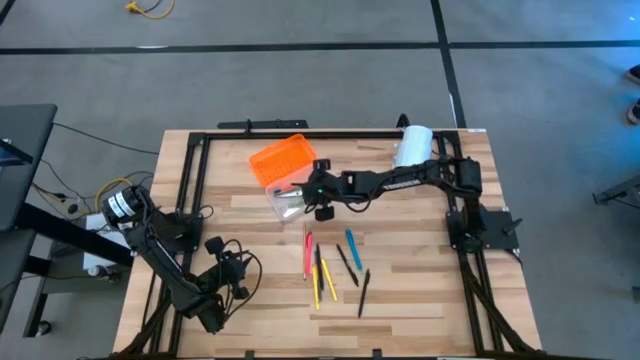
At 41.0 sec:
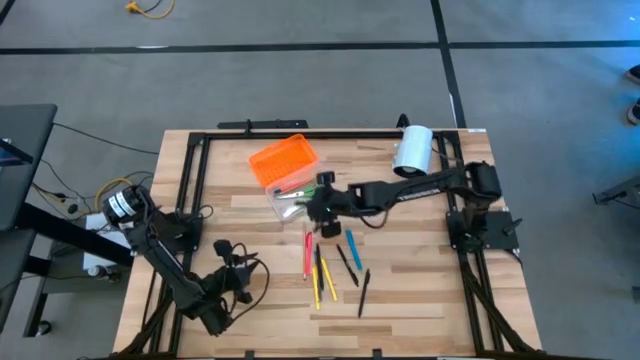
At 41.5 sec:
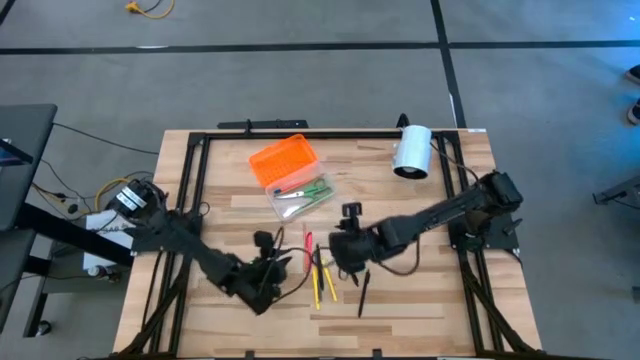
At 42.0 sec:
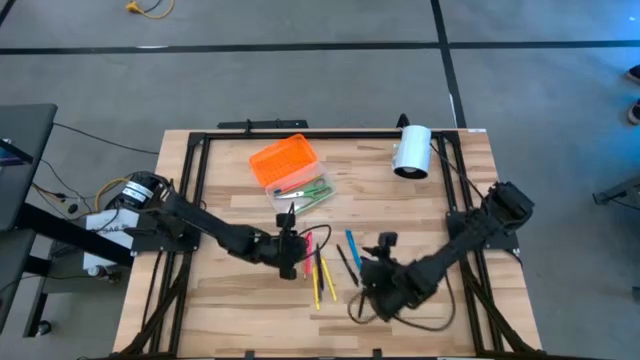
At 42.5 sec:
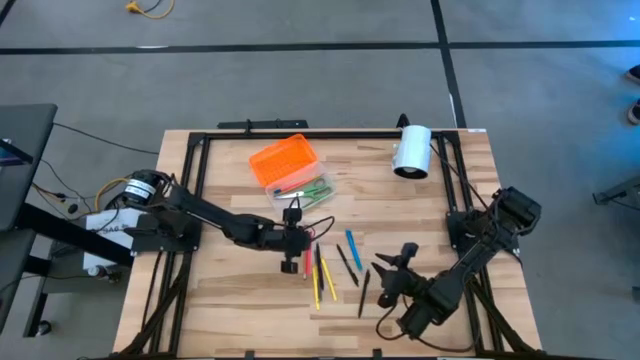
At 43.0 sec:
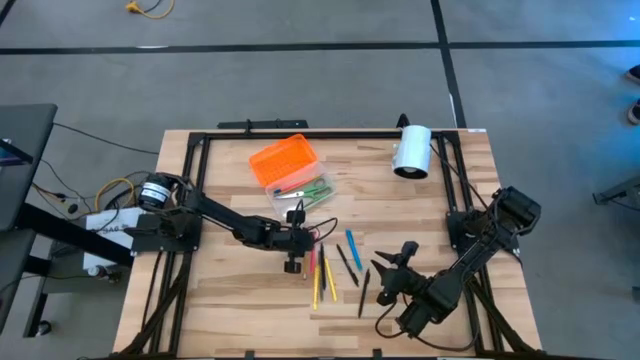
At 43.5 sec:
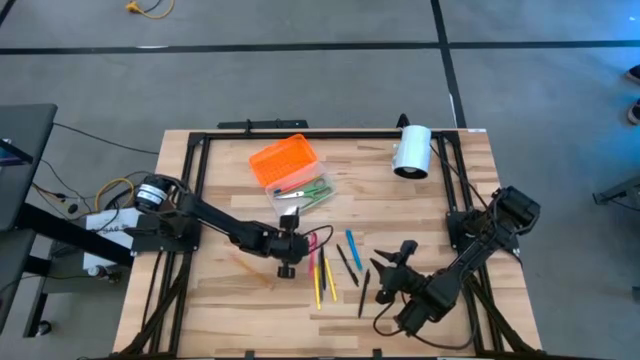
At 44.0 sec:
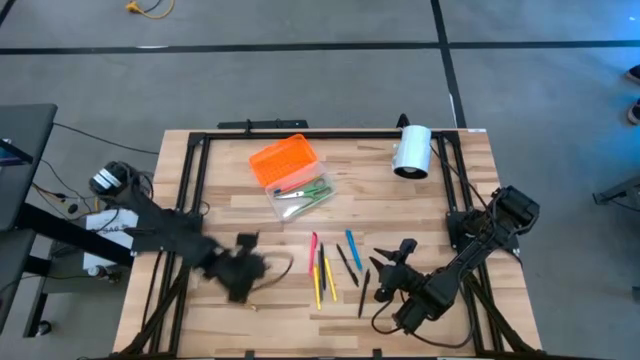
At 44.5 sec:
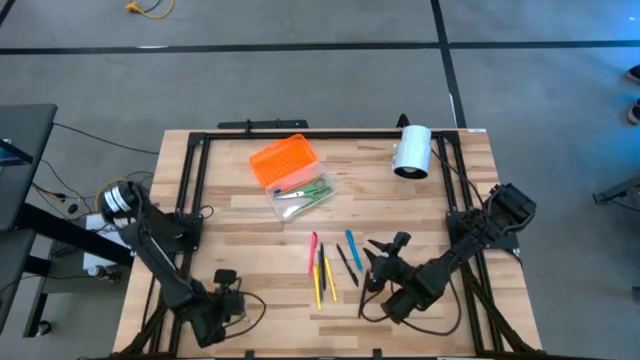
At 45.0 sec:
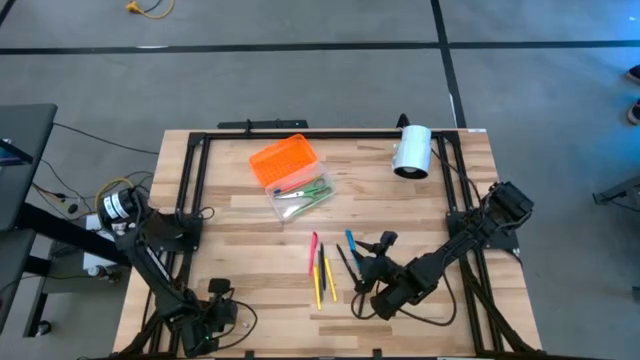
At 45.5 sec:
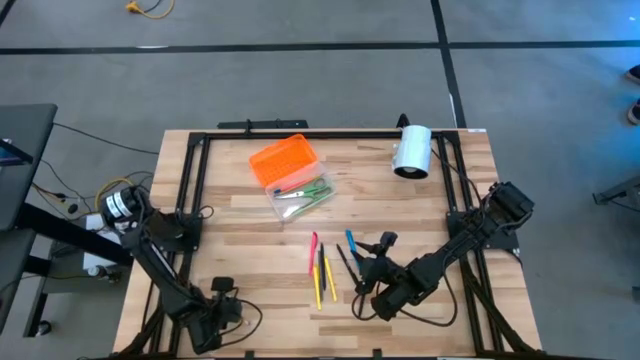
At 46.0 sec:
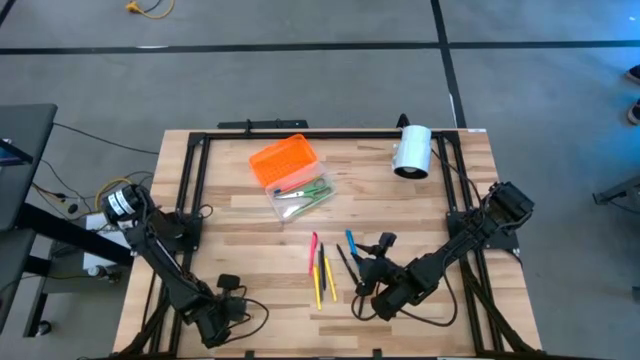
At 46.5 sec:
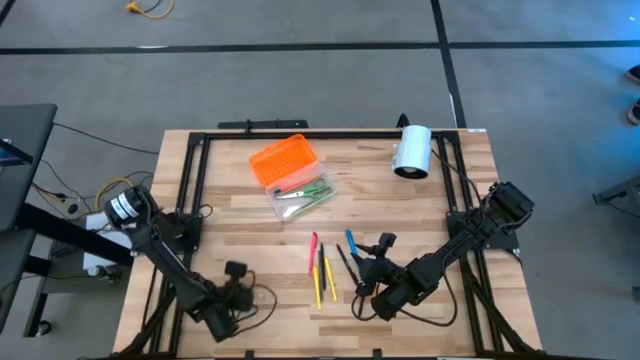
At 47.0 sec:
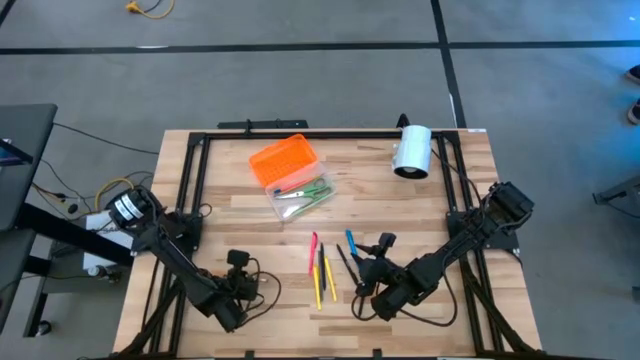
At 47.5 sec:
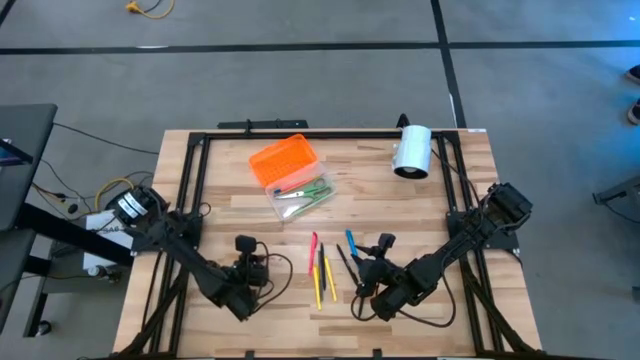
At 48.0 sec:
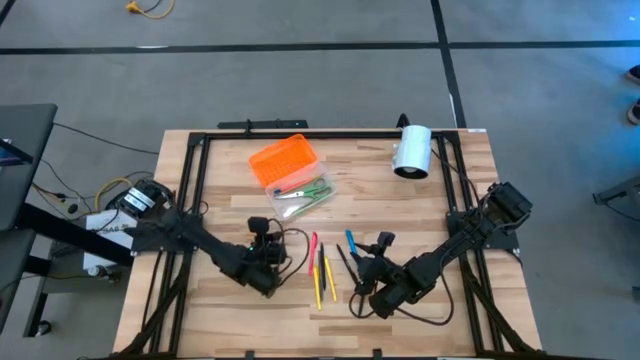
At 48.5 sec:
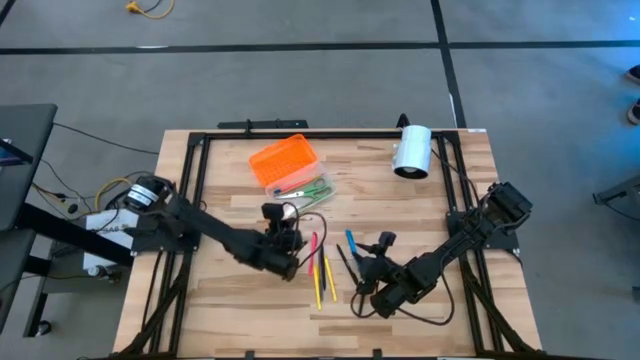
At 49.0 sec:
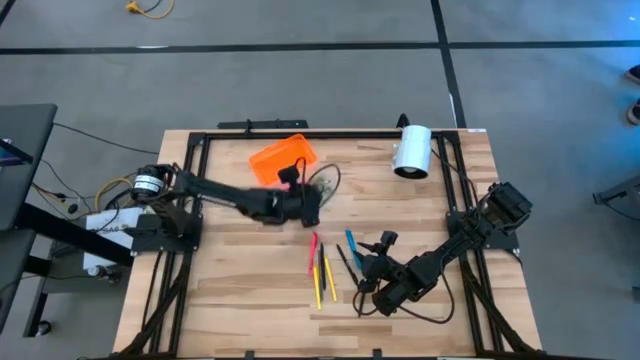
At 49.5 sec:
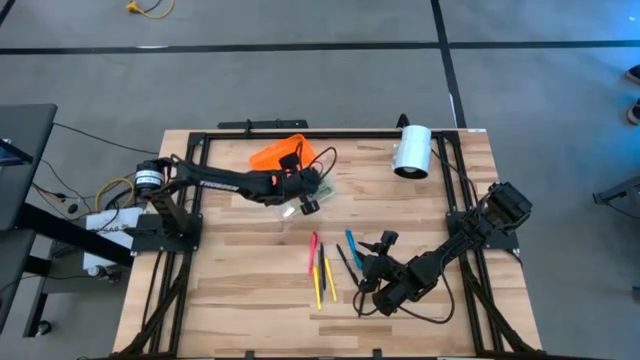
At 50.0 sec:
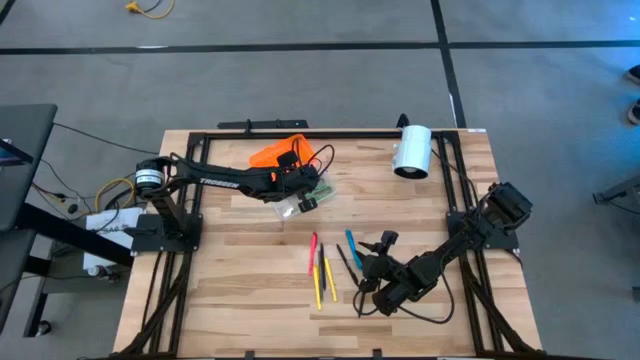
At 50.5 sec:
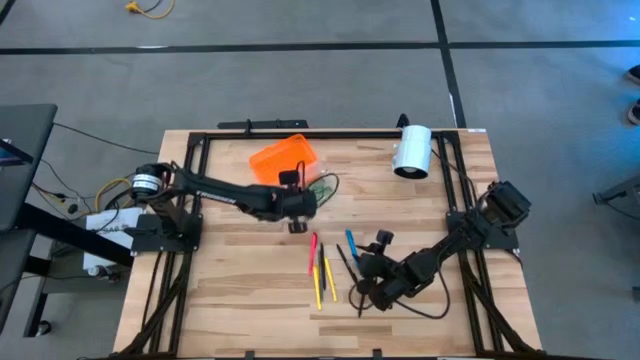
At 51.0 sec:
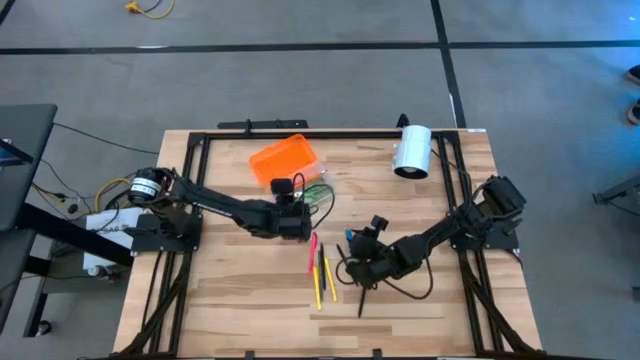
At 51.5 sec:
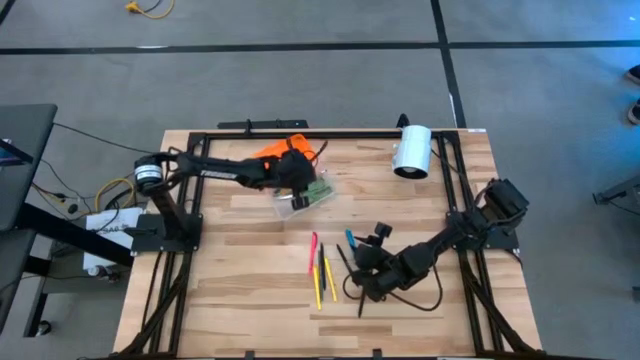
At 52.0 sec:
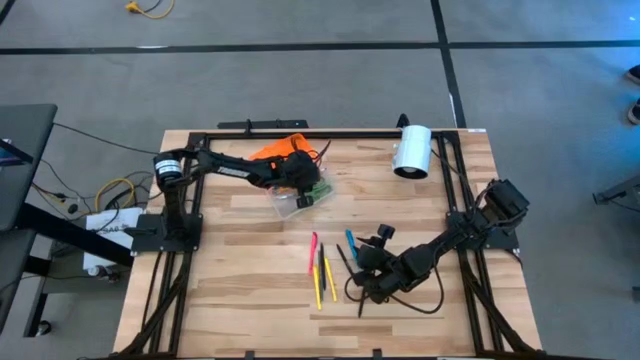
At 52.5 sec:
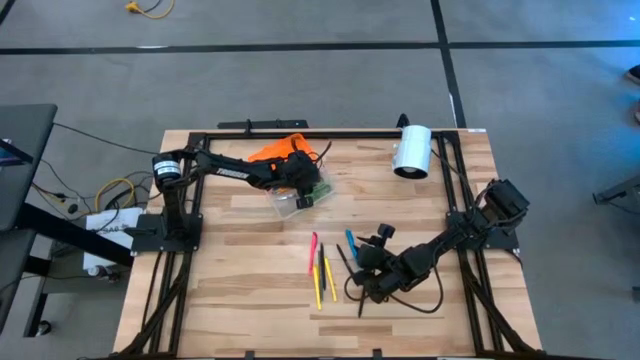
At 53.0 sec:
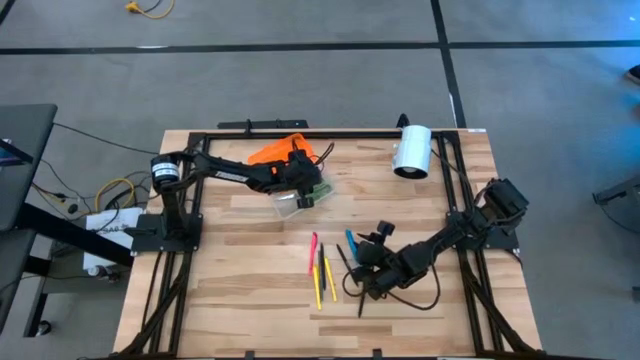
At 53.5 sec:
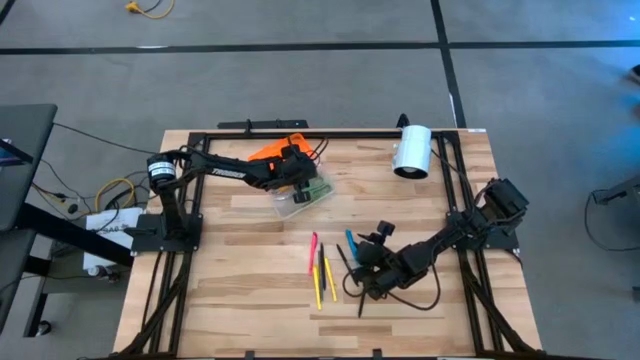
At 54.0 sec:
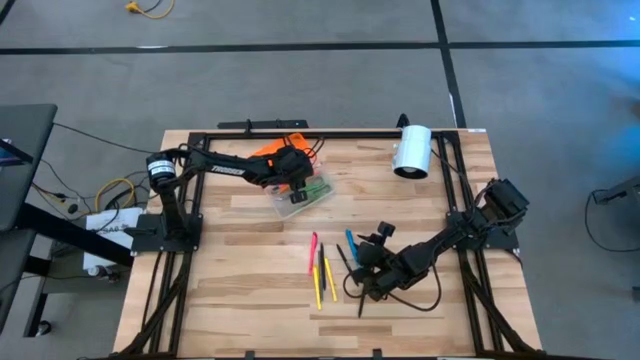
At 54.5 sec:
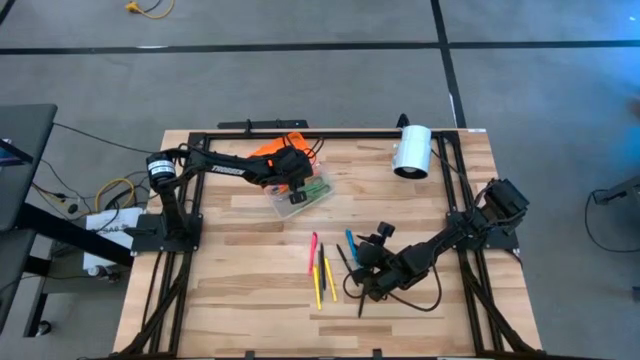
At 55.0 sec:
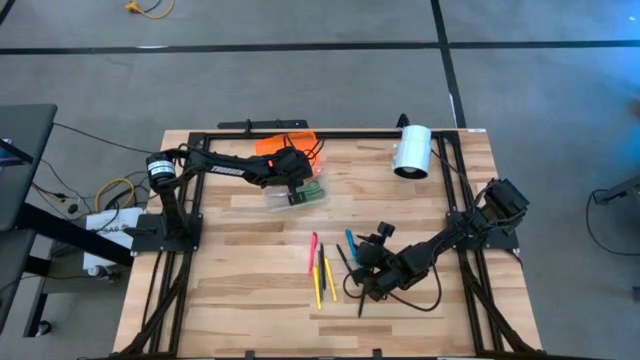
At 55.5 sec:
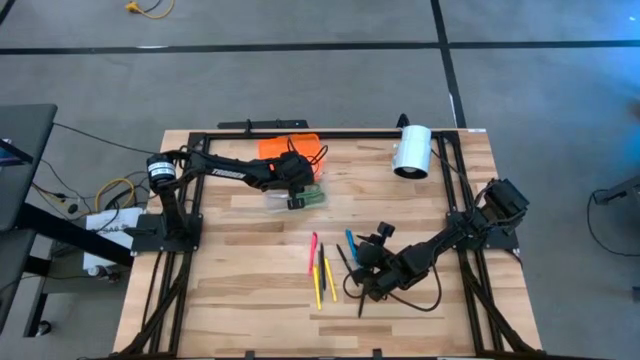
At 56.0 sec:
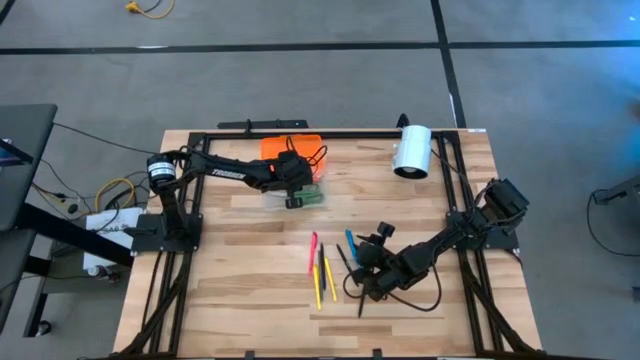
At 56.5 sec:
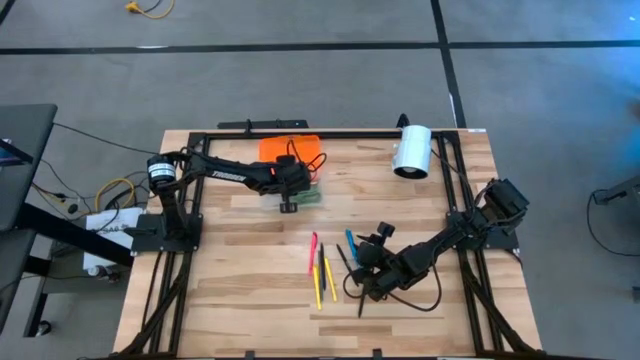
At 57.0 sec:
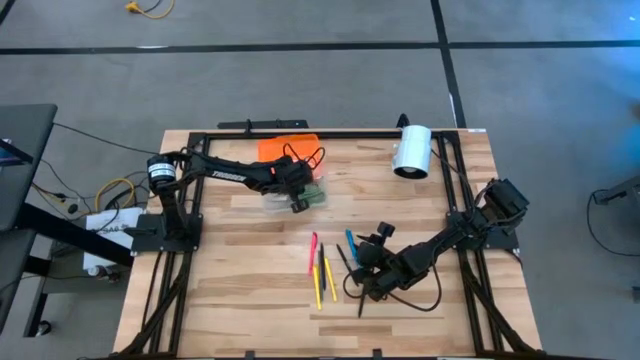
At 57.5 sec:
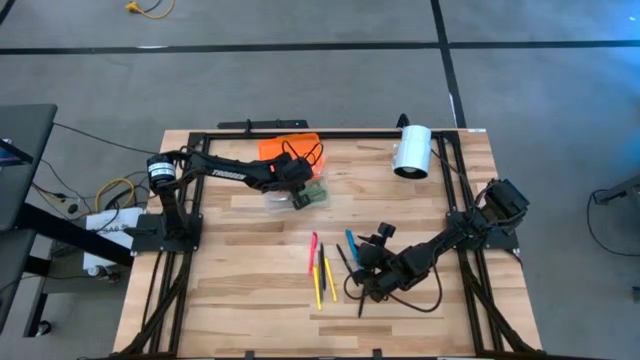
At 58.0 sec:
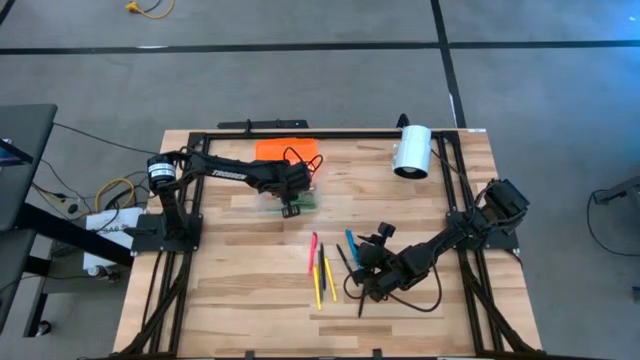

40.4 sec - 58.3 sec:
Task: Pick & place school supplies into a supply box
Put the orange pencil into the supply box

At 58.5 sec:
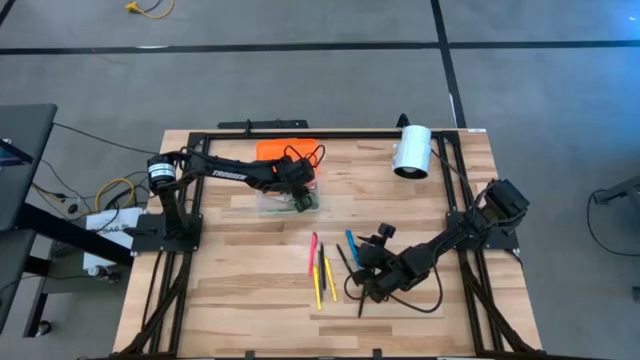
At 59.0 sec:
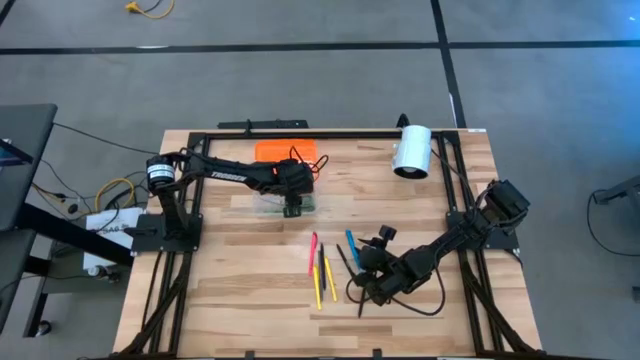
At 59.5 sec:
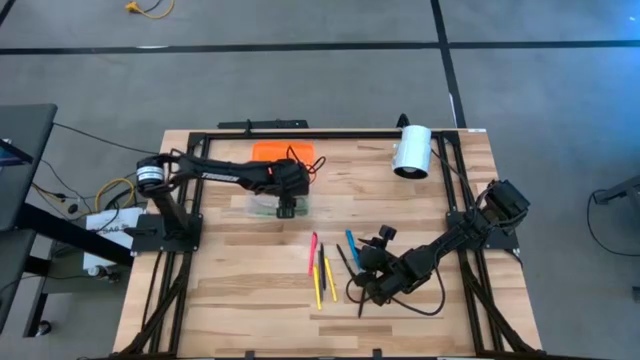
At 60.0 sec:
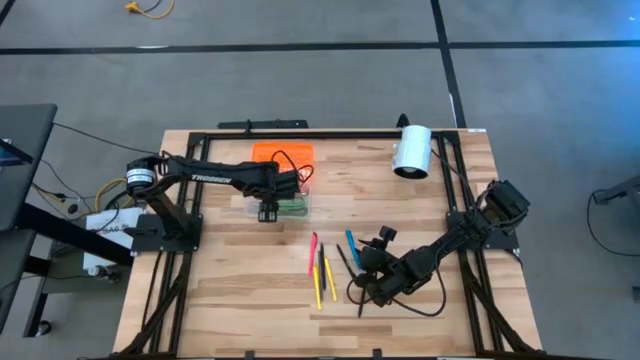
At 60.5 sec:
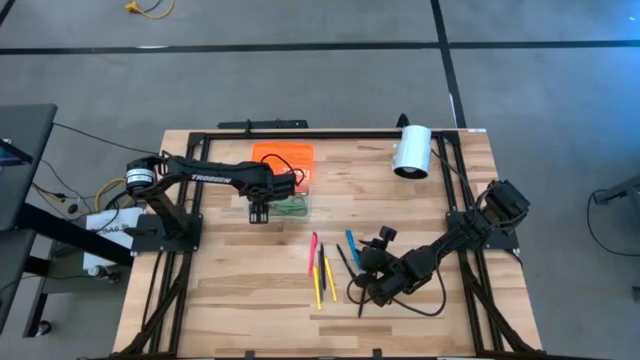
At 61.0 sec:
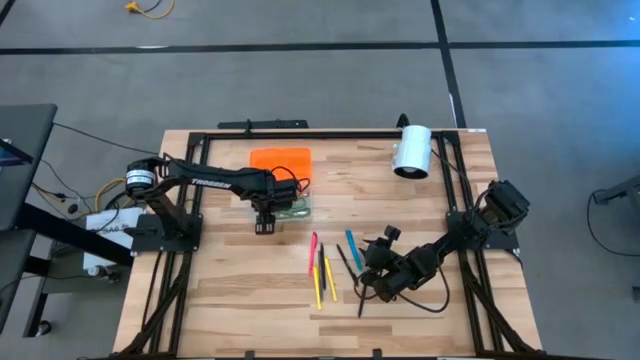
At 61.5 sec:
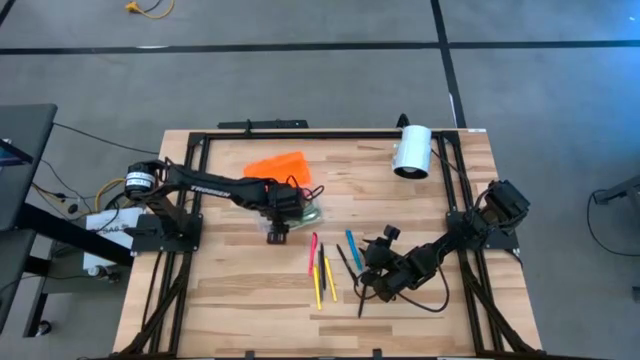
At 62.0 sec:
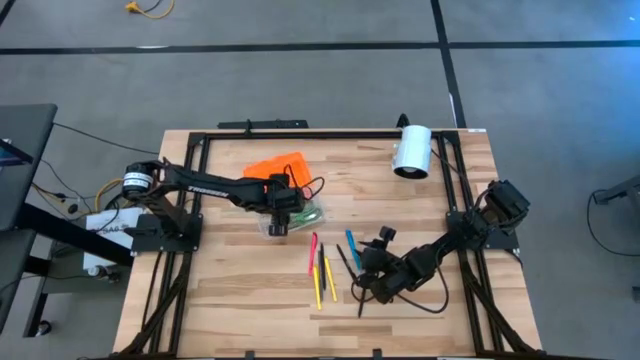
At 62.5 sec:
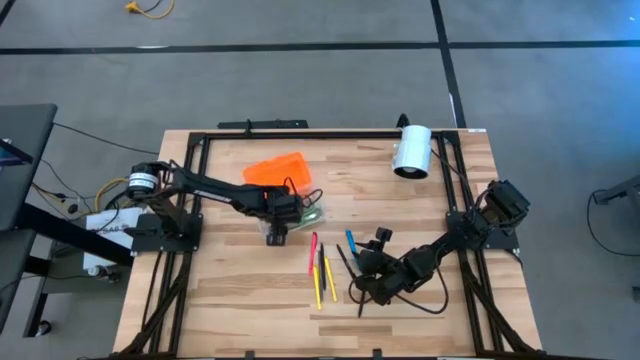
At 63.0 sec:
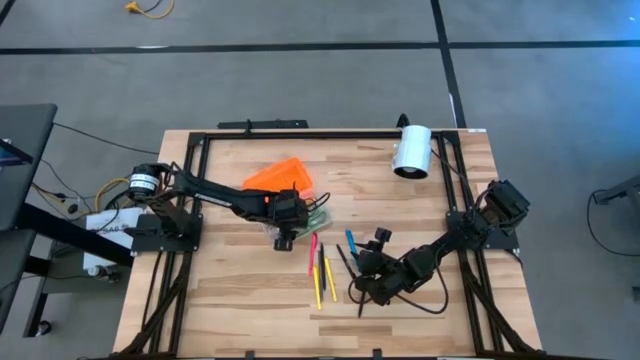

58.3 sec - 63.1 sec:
Adjust the supply box on the table
